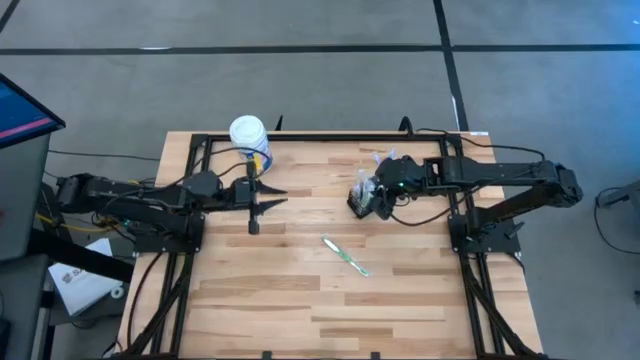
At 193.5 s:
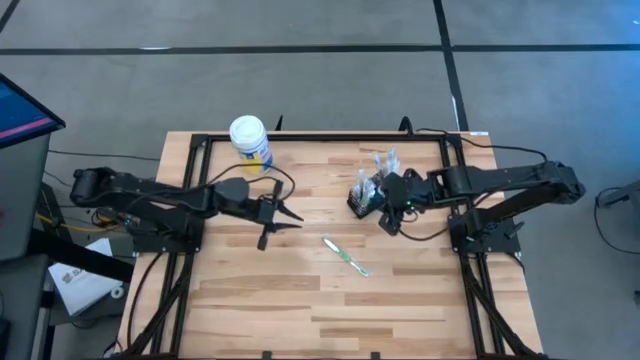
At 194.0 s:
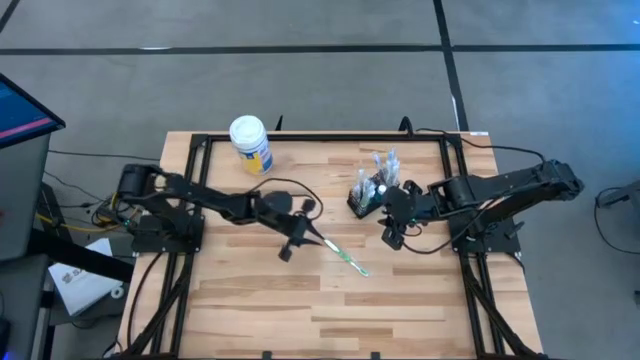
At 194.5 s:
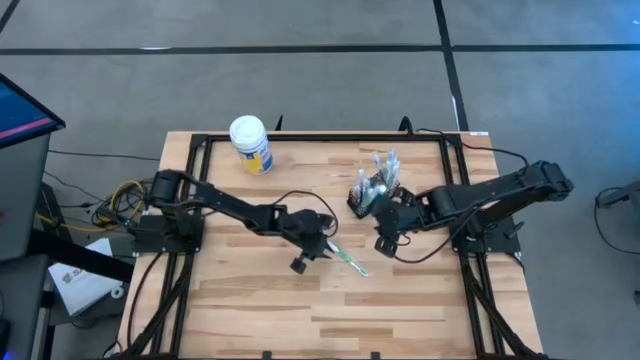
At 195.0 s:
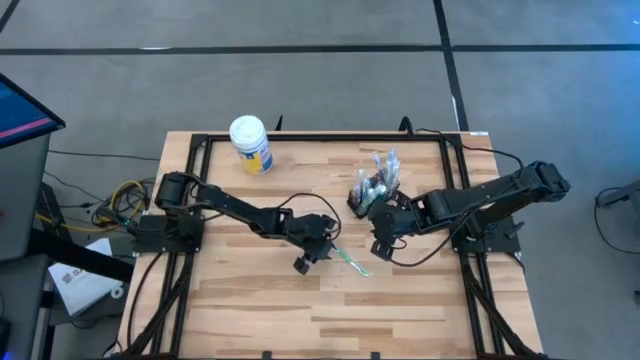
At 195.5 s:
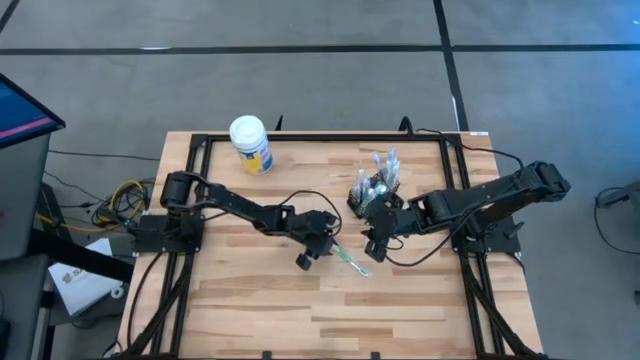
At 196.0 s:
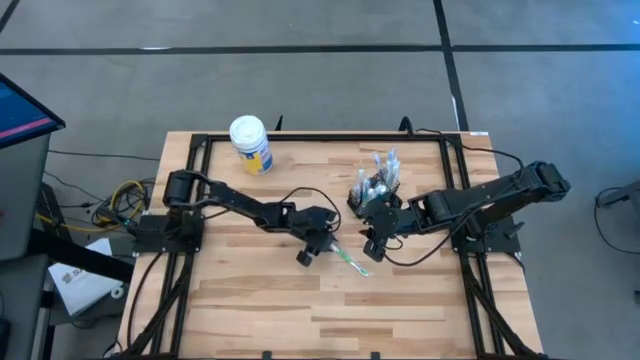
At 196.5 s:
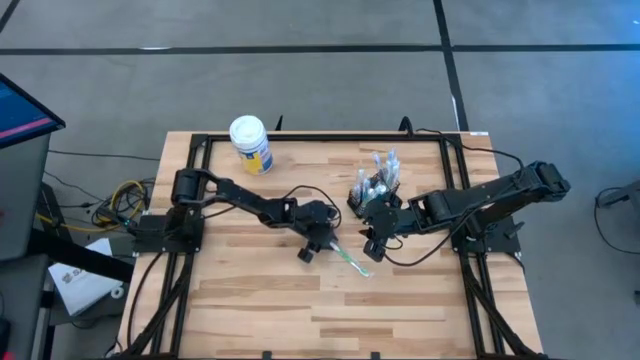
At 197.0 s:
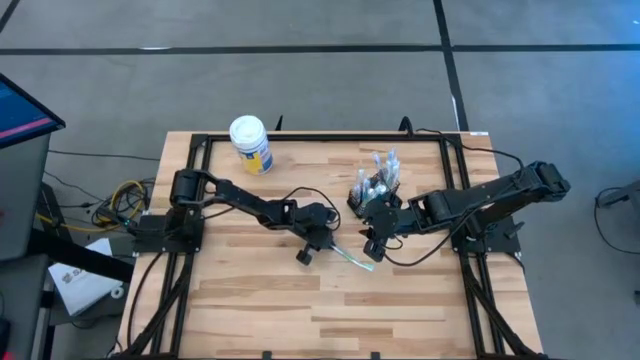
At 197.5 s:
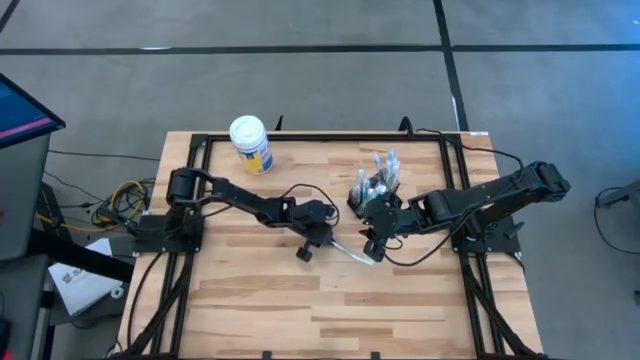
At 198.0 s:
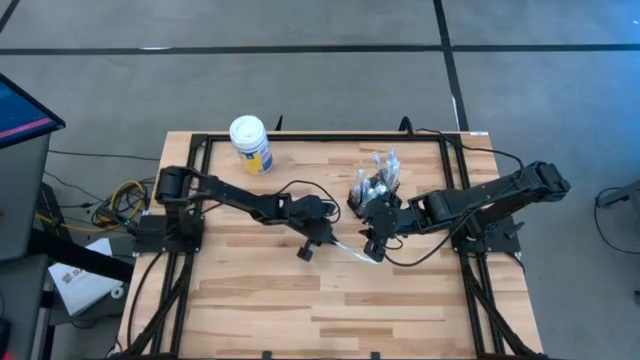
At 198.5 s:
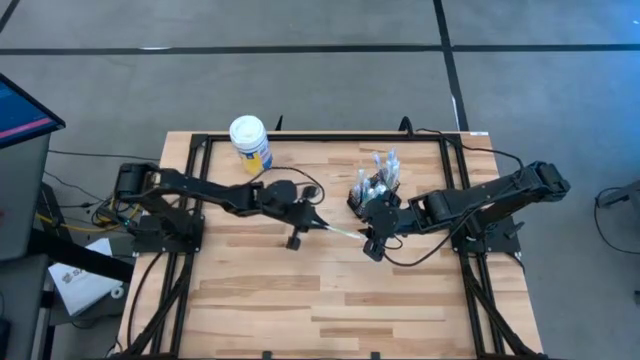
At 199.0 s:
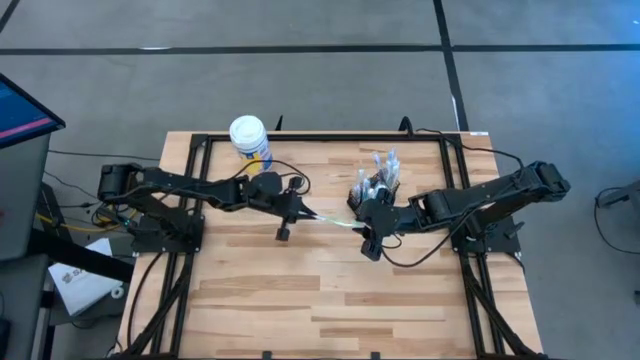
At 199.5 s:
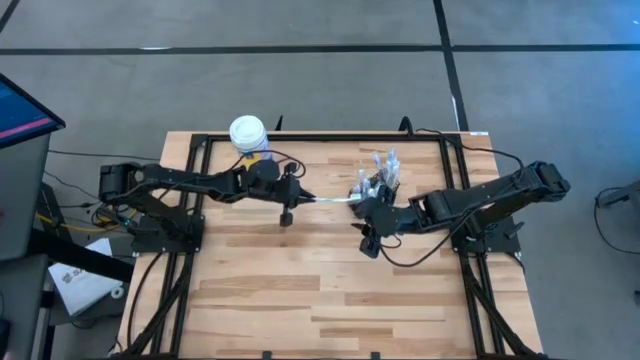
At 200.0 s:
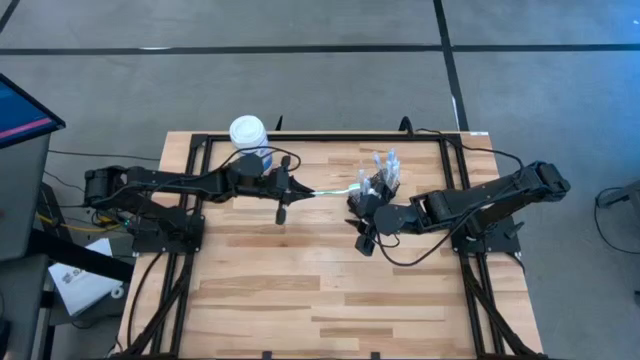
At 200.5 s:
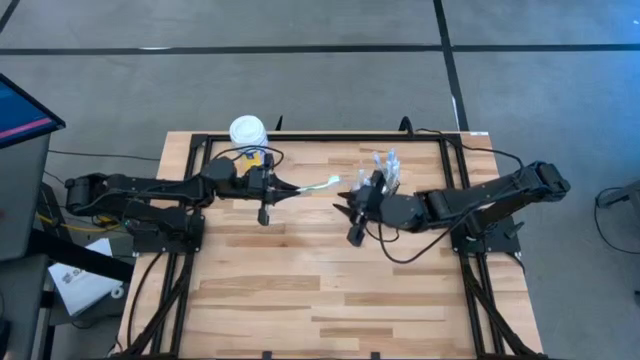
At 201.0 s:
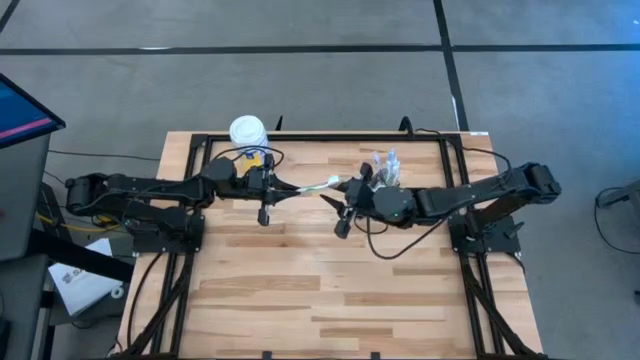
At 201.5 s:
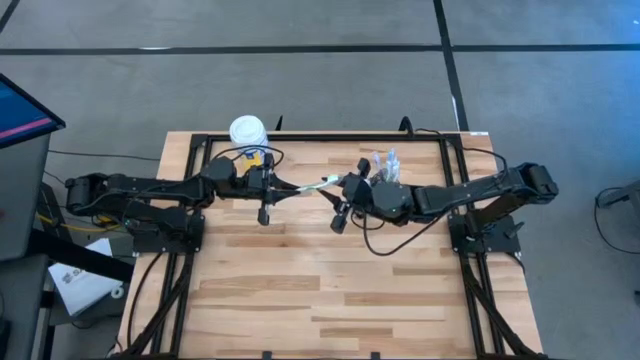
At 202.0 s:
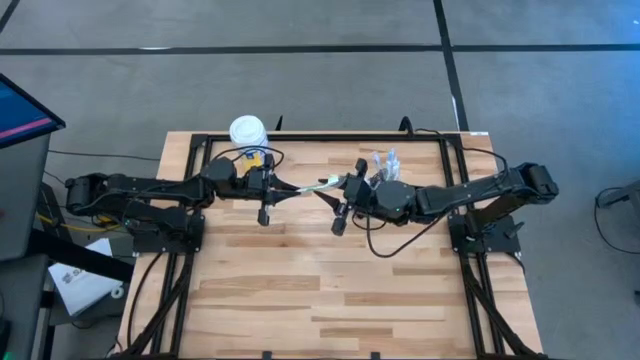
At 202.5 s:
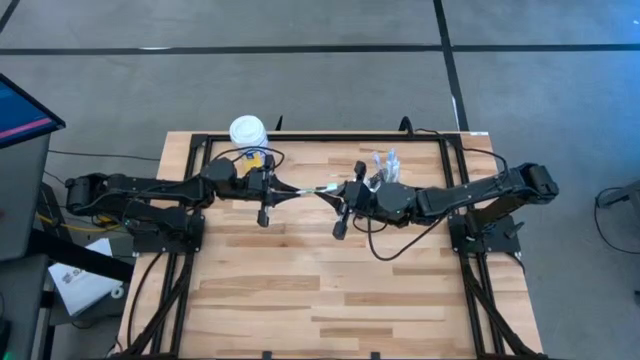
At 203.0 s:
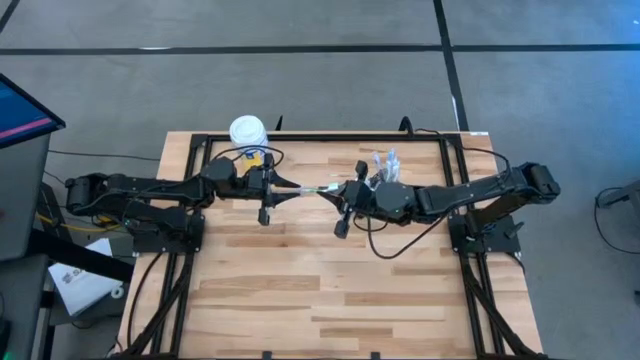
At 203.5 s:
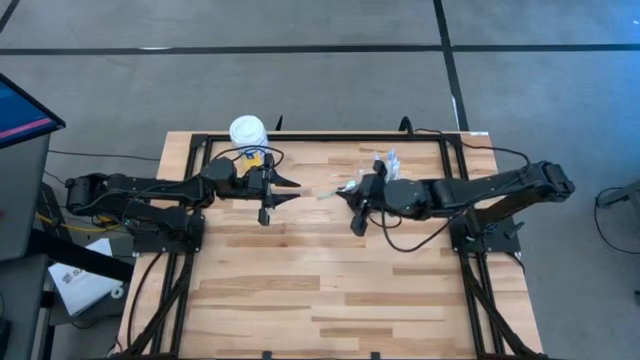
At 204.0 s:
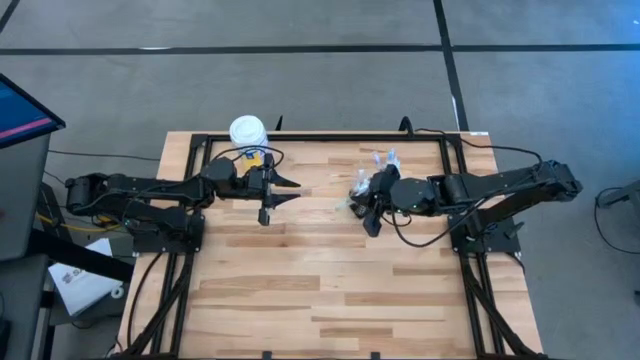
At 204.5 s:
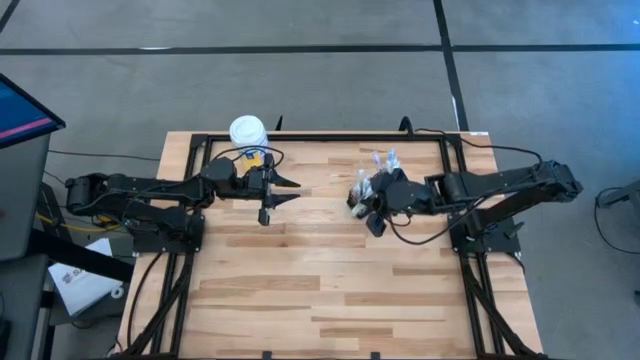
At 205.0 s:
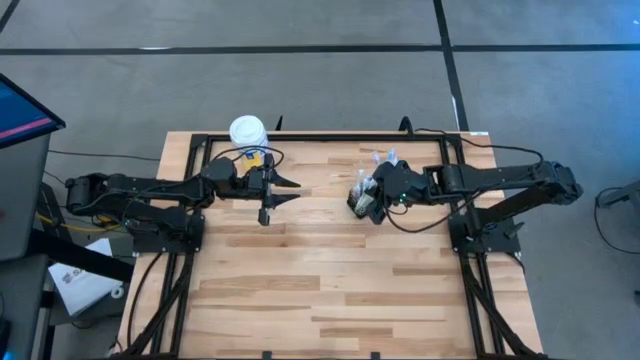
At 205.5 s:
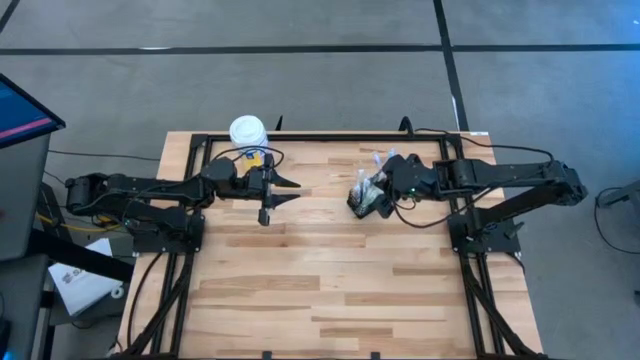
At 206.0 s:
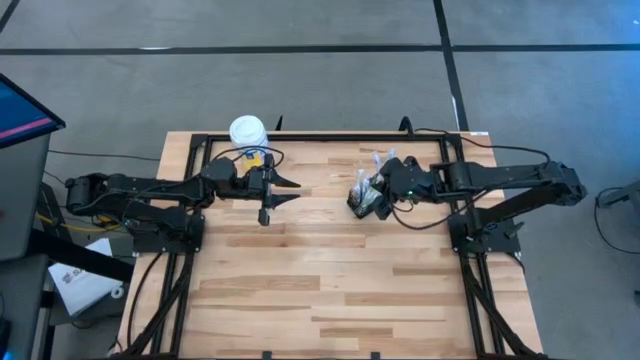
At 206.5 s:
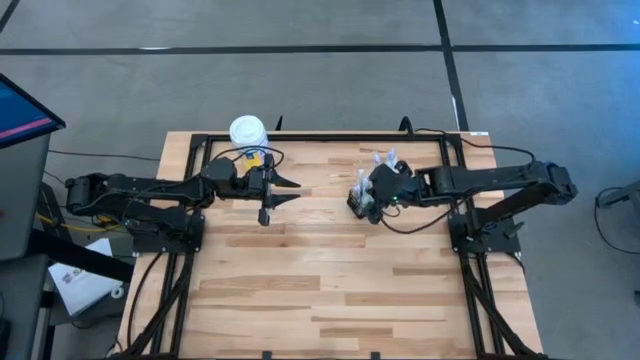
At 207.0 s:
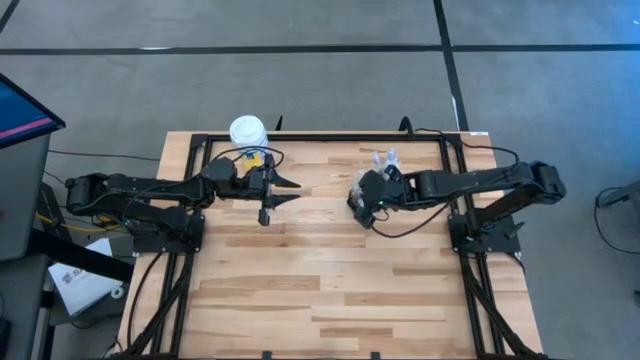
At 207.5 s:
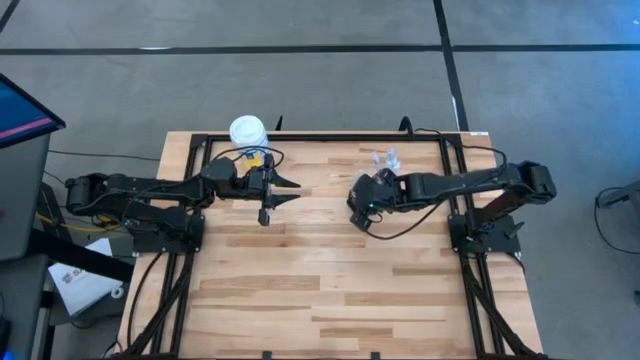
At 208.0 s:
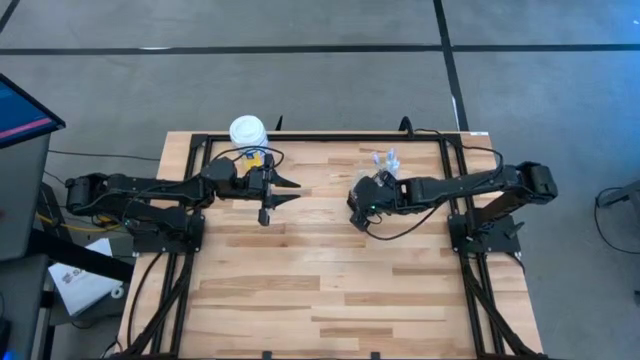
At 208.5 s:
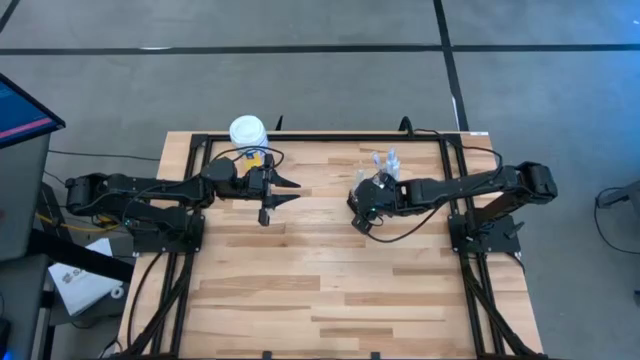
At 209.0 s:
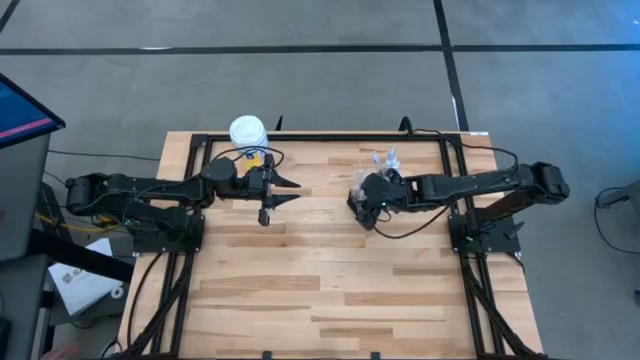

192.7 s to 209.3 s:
Task: Pick & Place toothbrushing station
Put the green toothbrush into the mesh organizer

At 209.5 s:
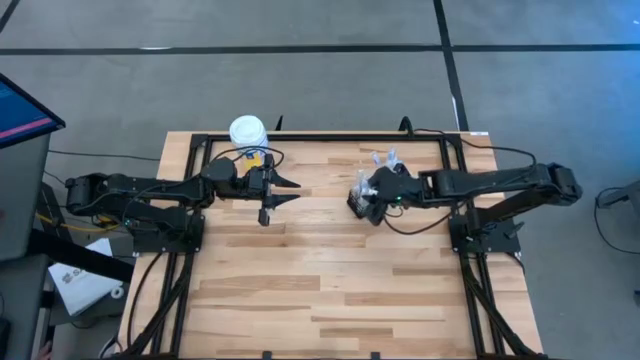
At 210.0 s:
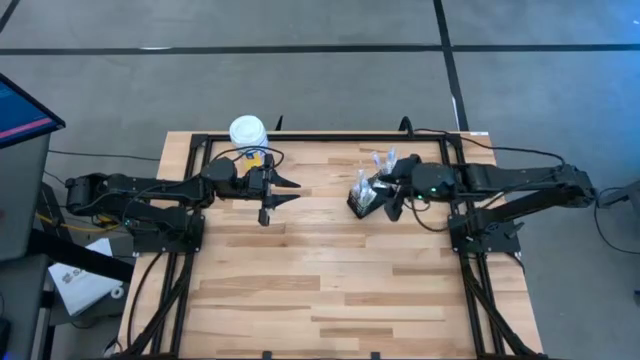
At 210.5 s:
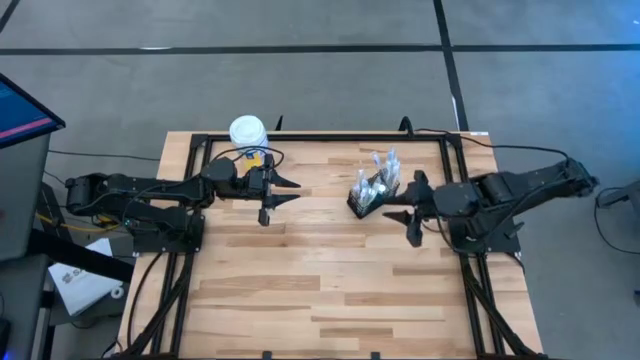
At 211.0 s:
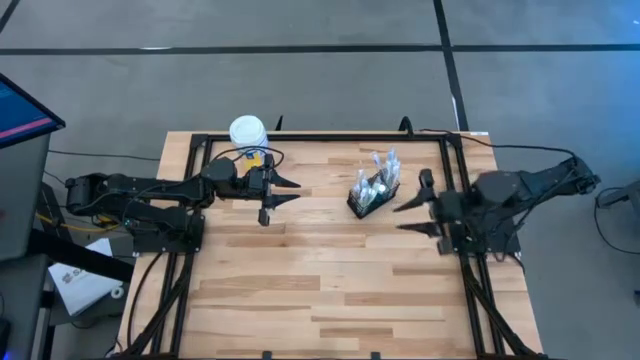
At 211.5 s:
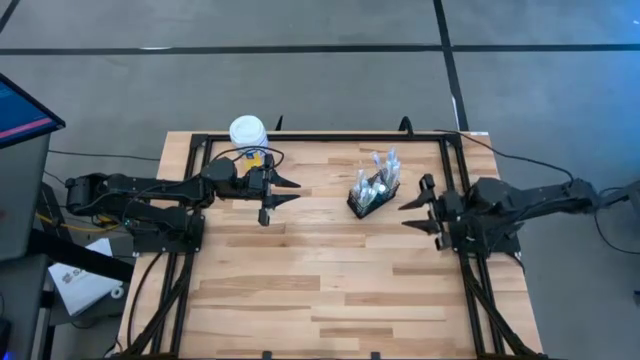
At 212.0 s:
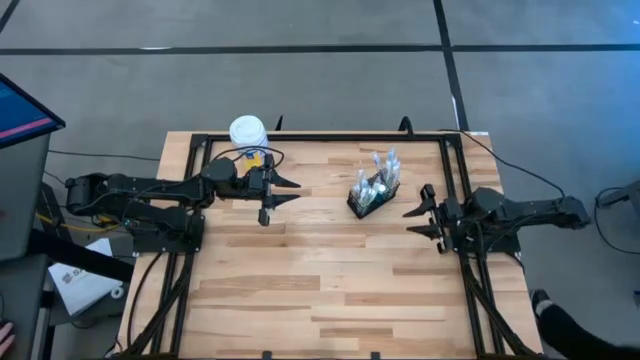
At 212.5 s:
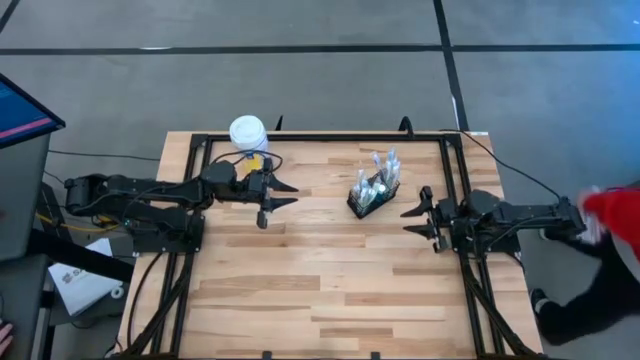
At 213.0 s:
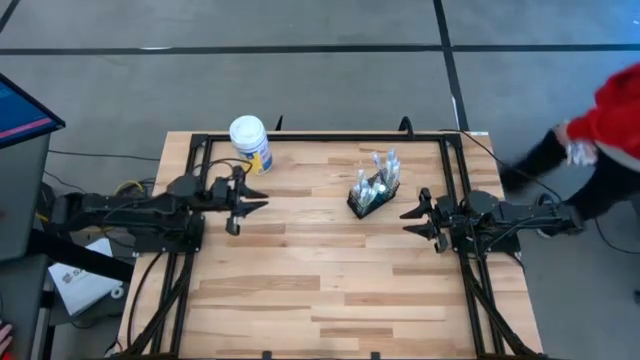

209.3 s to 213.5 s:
Return to Home Position
